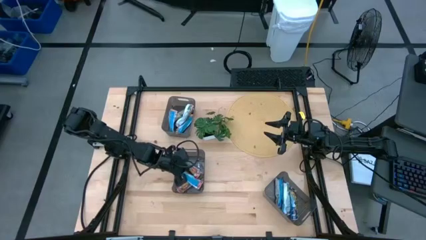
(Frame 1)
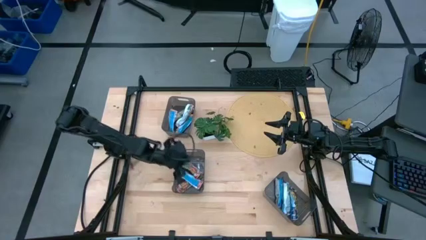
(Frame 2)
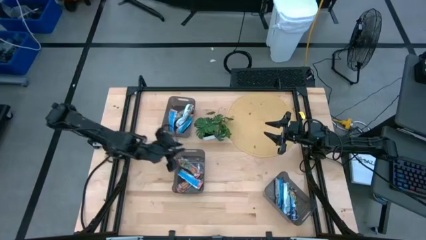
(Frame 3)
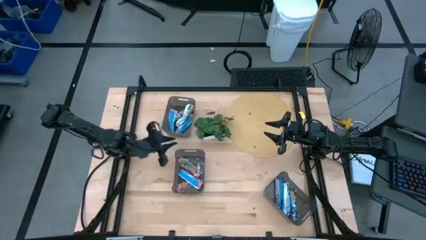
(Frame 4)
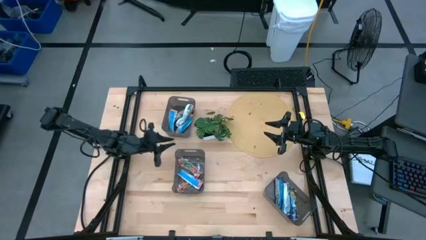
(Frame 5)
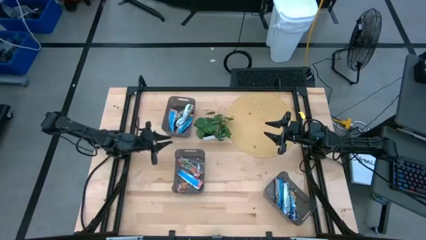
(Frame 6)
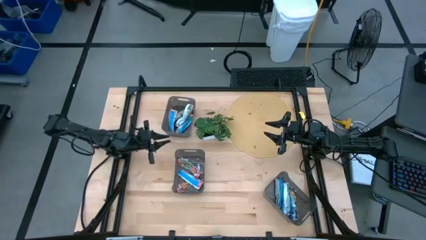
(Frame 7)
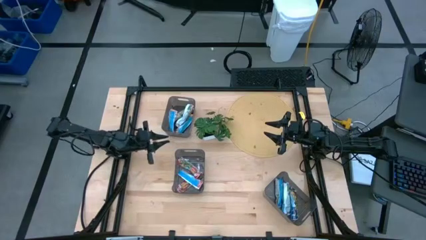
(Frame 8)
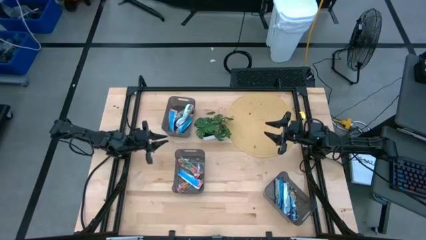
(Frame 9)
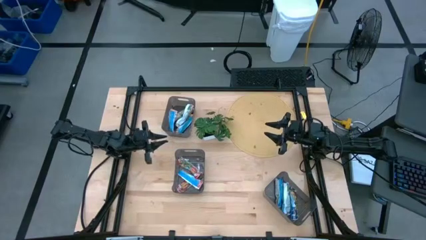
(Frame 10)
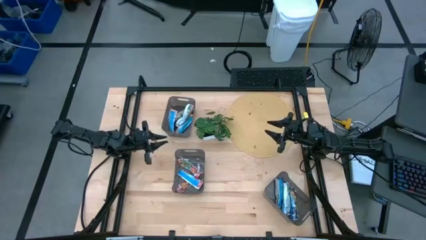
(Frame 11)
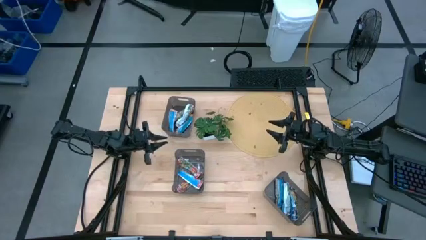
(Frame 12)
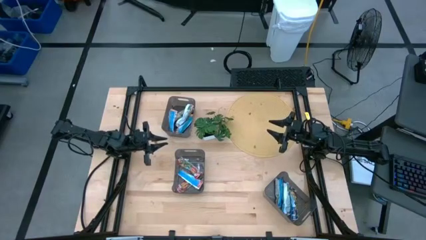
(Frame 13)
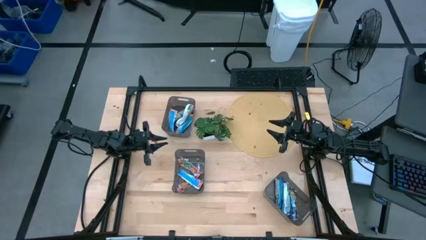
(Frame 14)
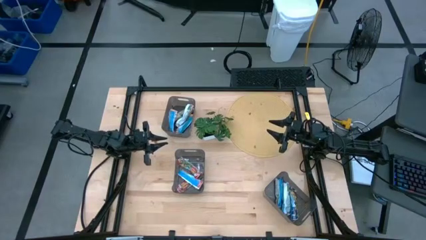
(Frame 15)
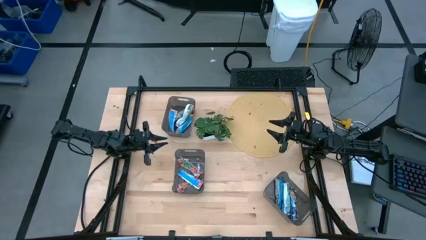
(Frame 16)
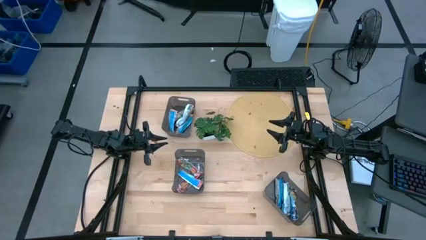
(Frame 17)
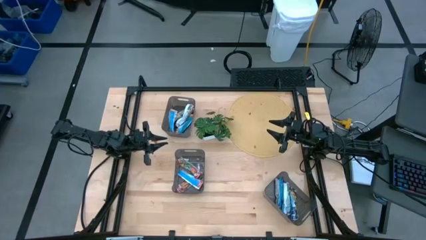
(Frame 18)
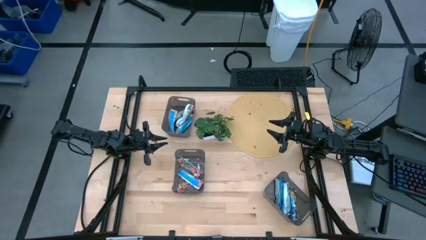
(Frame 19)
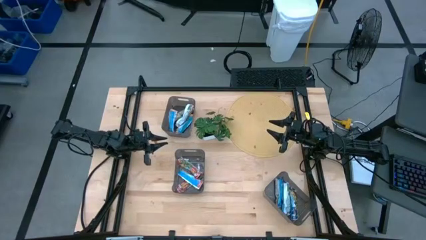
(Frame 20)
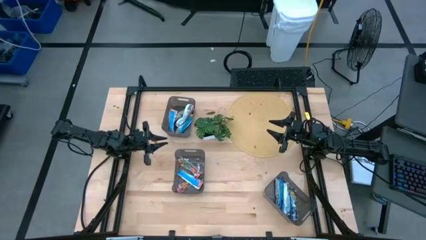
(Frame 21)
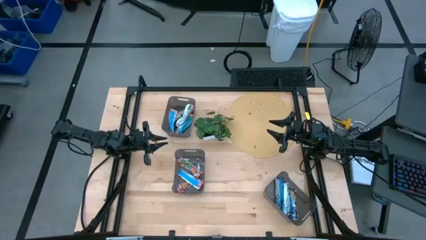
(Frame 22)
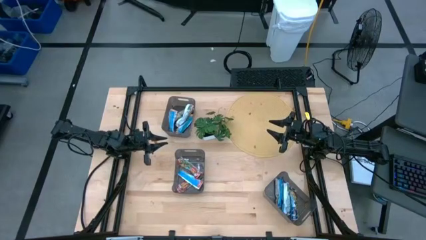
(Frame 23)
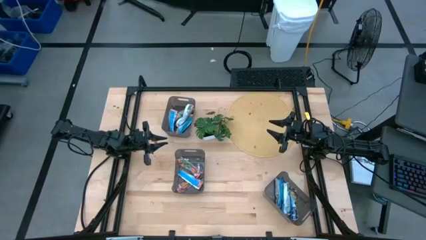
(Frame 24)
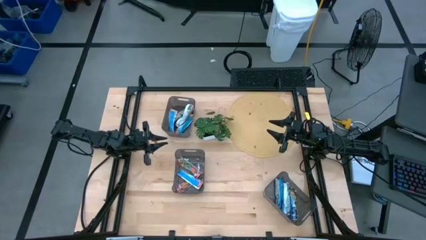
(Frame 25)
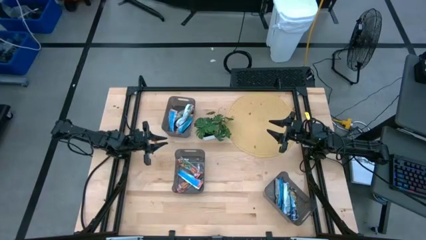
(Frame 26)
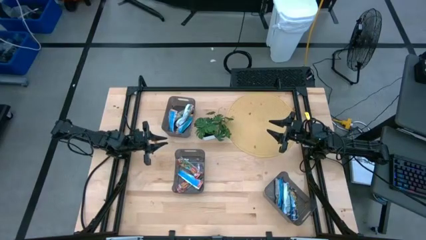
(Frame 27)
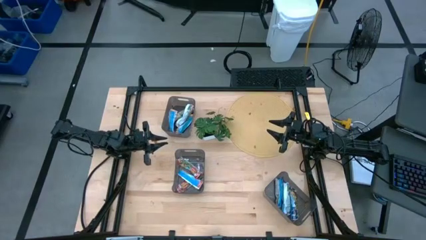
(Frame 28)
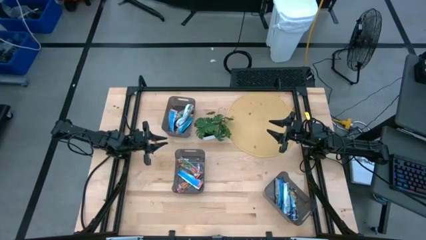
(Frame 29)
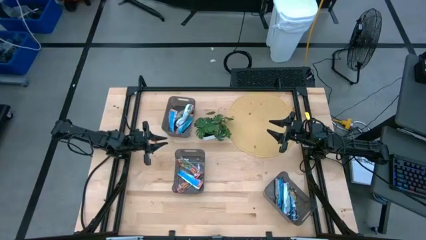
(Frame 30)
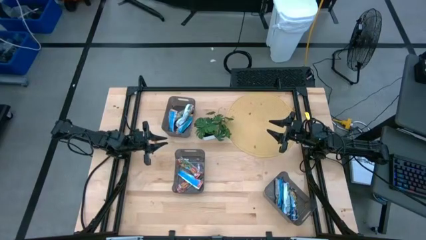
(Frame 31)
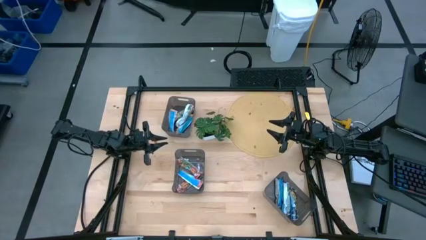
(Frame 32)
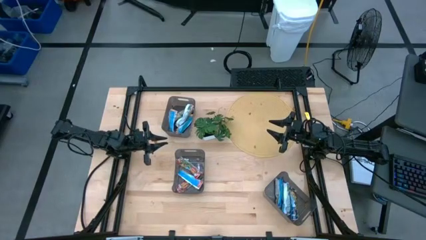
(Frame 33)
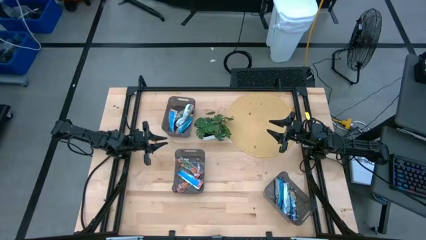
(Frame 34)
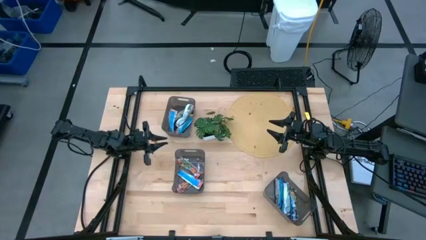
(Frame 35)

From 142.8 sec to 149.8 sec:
Task: Pick and place Granola Bars by type
Return to Home Position

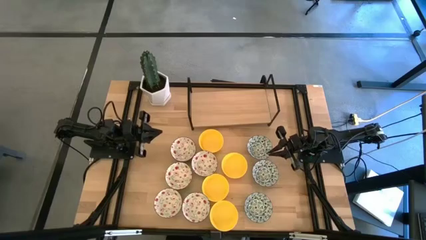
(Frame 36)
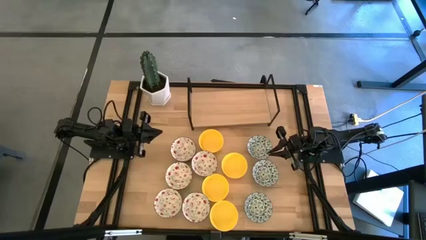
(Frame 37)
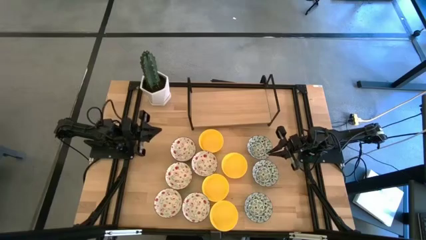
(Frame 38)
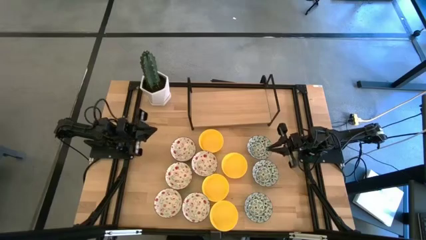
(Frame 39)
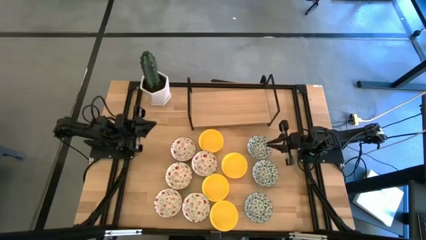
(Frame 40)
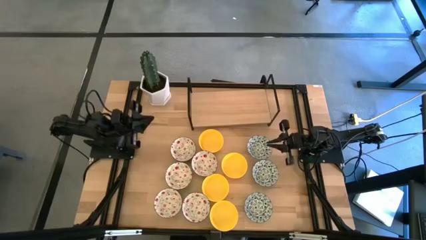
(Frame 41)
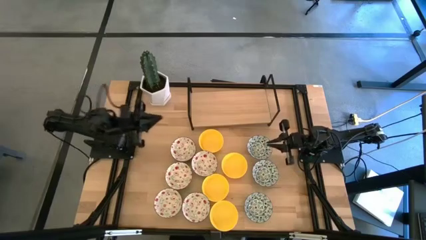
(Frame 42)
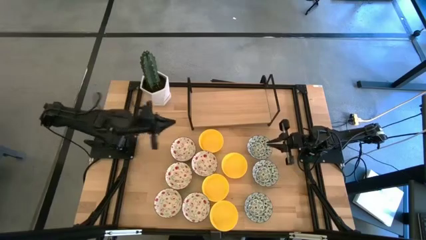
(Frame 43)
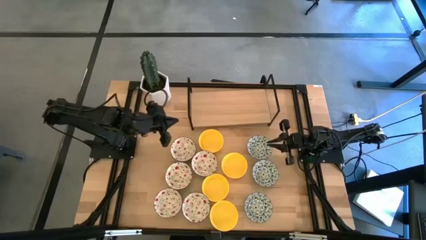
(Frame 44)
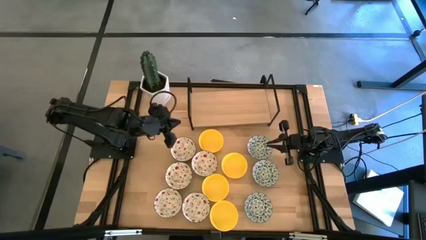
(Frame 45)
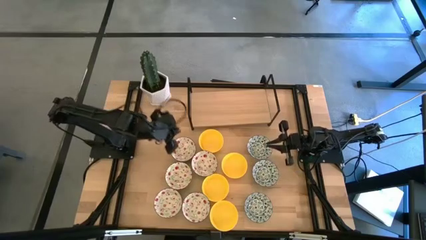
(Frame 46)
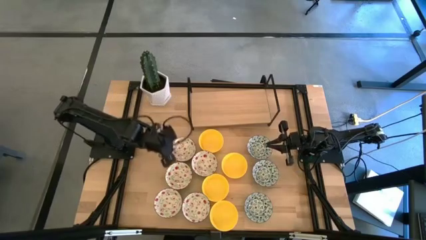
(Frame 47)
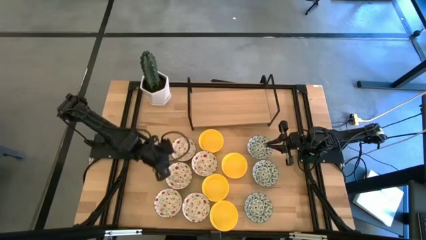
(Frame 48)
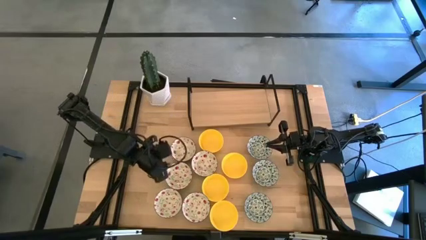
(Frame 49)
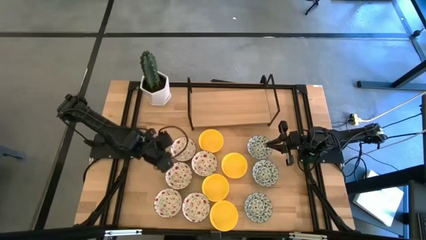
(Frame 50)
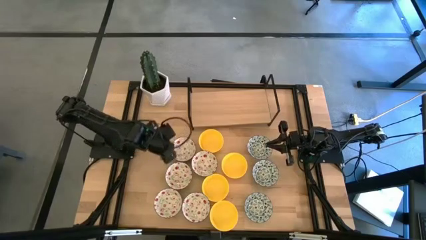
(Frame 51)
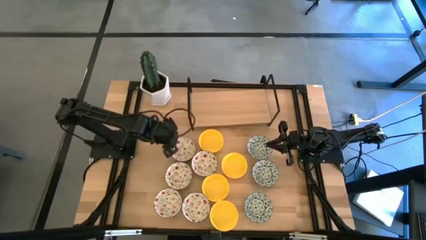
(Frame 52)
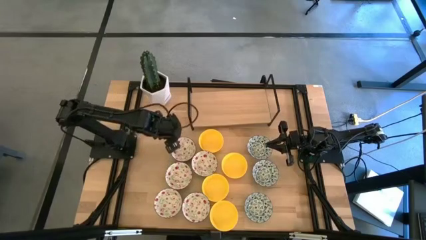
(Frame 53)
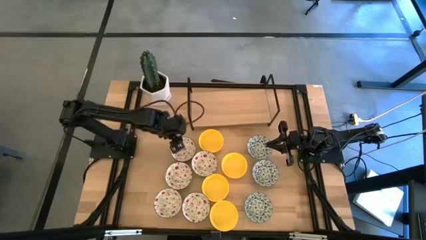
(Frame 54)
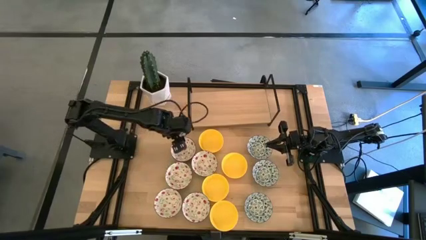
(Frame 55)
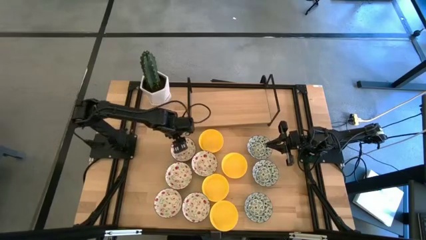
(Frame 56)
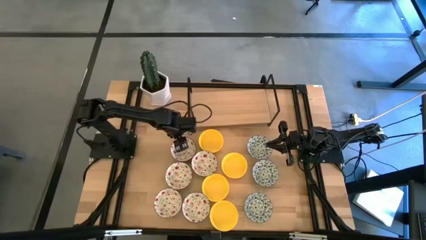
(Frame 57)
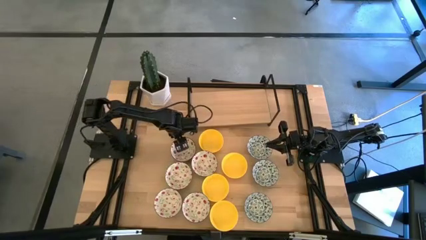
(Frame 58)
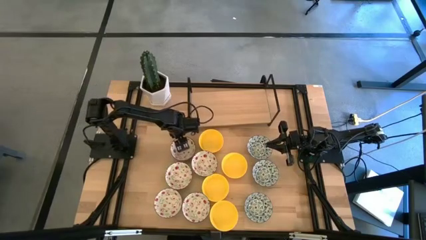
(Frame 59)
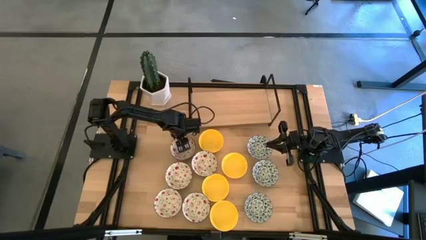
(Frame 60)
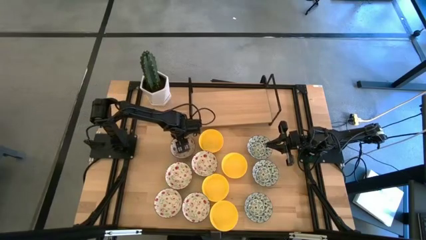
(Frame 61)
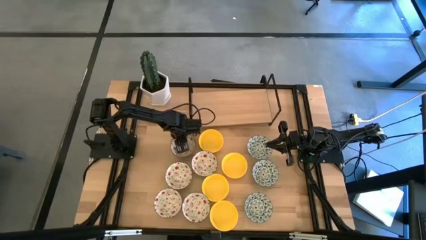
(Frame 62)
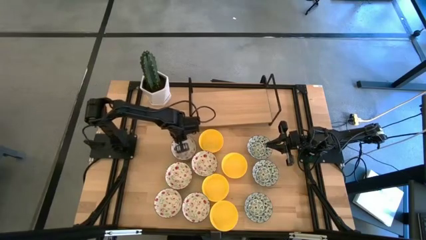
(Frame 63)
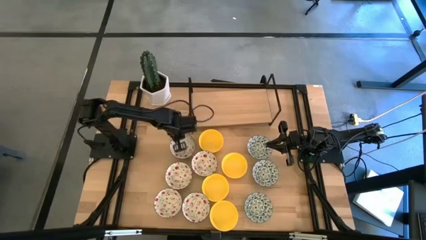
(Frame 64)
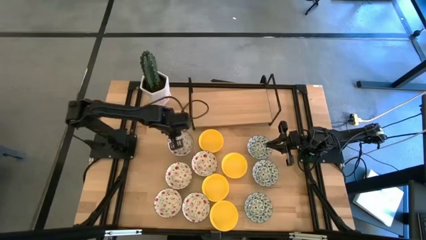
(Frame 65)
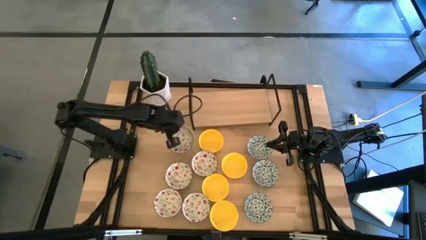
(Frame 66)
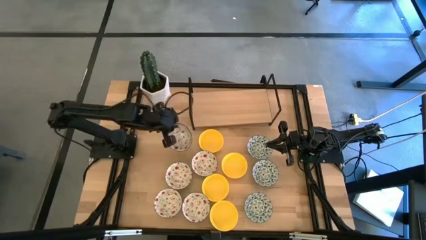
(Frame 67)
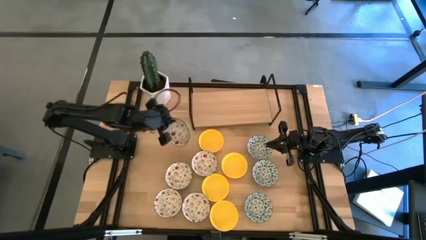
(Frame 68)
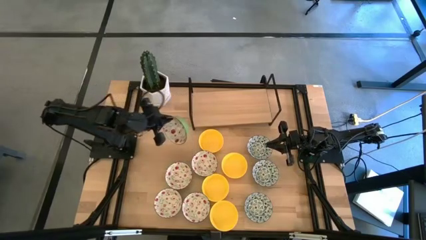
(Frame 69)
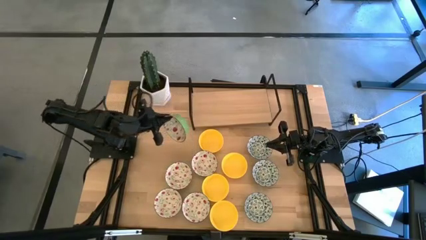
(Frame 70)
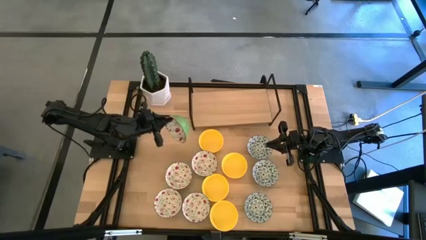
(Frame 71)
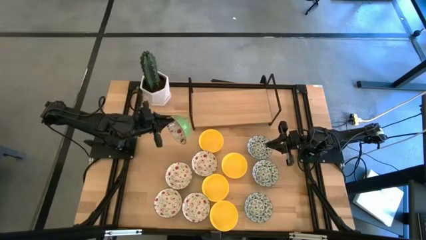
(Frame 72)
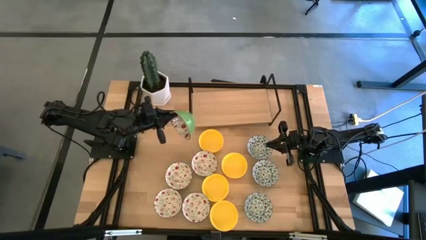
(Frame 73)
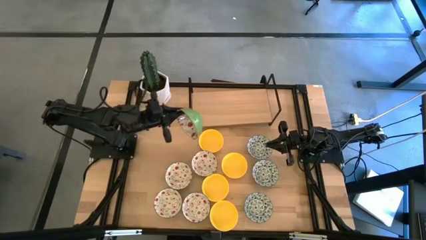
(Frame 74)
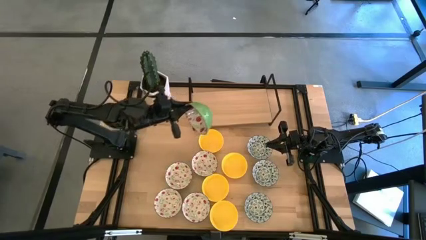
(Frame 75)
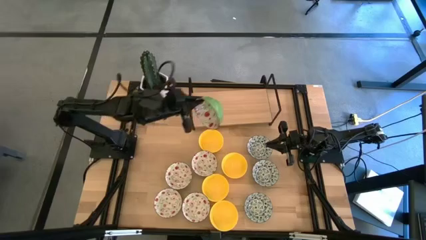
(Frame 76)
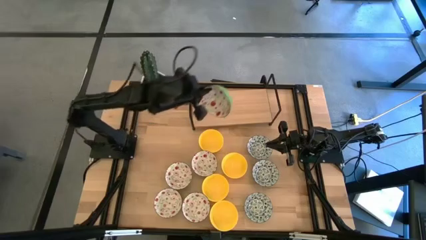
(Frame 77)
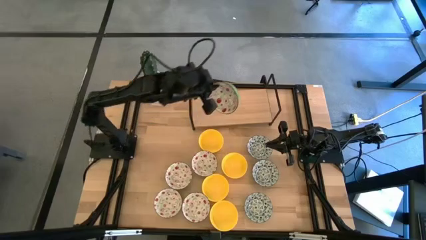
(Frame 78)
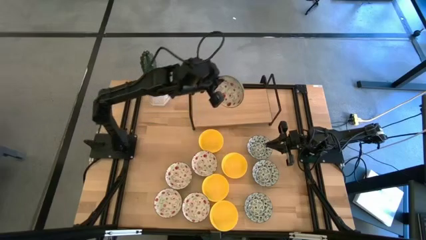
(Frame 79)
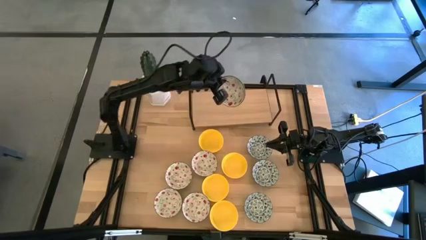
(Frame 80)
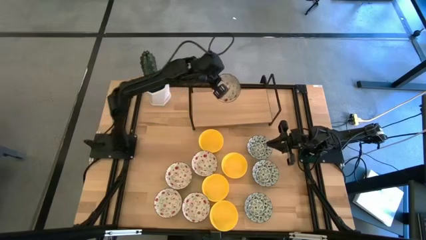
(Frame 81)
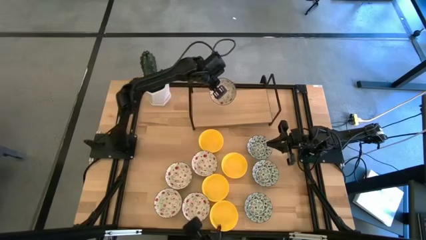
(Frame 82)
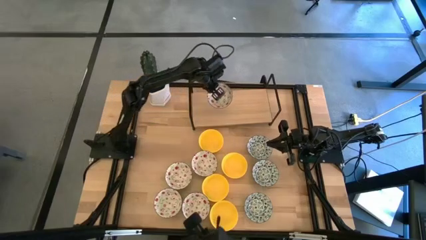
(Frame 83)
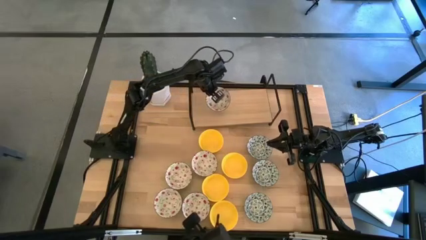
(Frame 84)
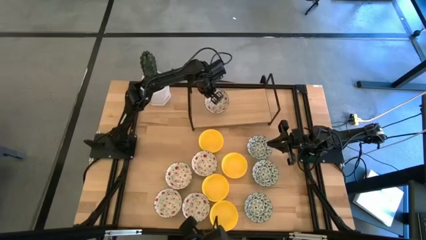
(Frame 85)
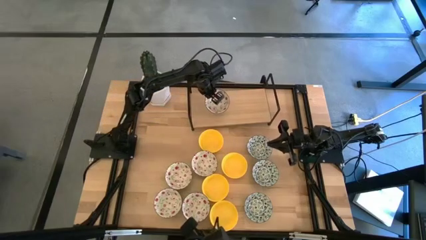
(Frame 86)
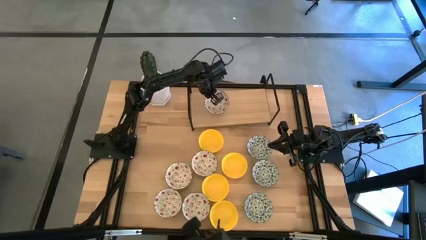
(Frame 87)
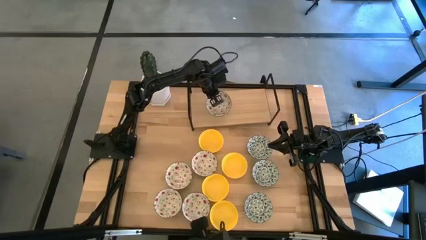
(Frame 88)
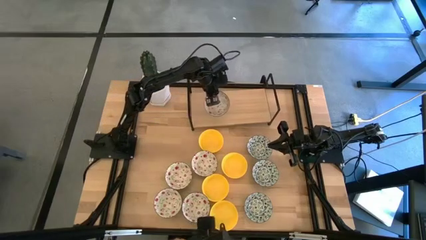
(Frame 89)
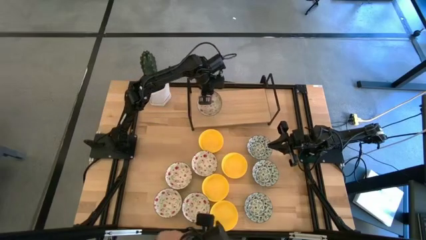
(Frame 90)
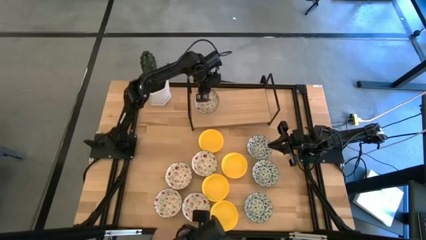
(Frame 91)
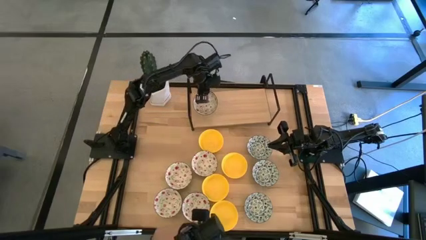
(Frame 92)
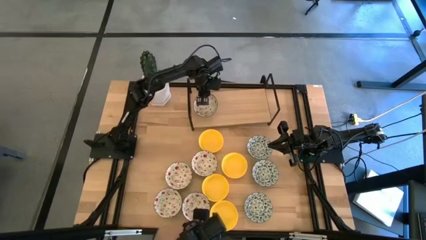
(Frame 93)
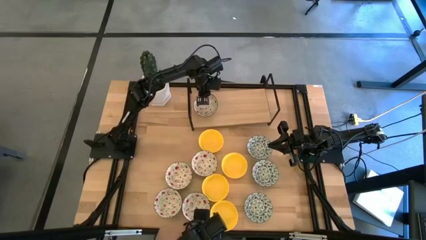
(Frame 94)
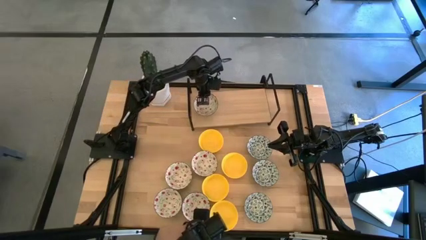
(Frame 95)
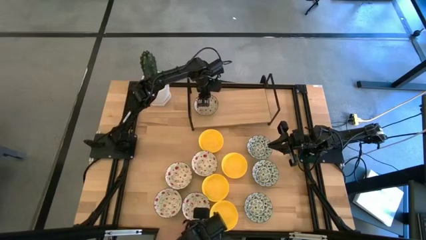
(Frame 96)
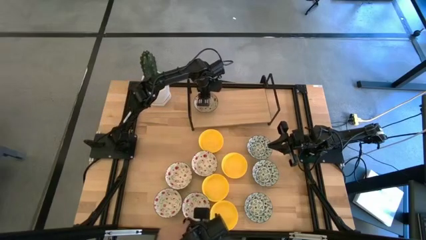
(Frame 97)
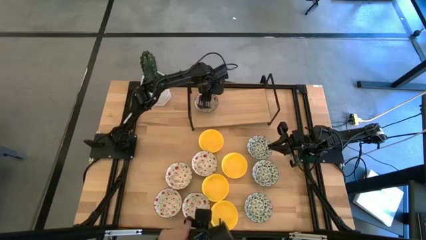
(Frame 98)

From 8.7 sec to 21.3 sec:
Task: Pick & Place Mini bowls
Put the green patterned bowl on the shelf
